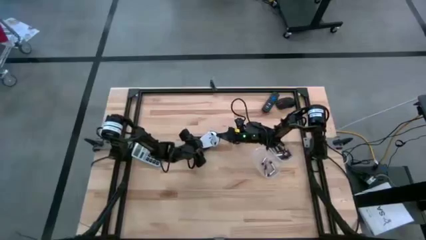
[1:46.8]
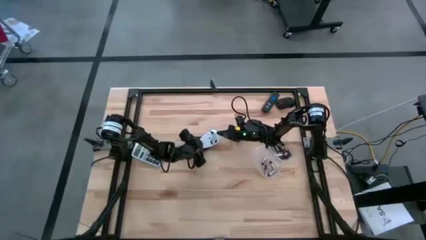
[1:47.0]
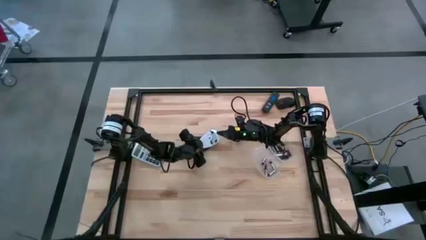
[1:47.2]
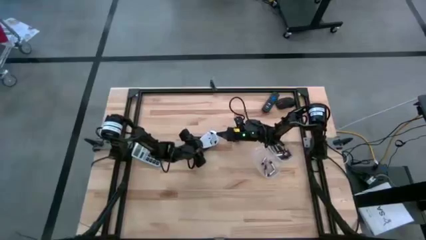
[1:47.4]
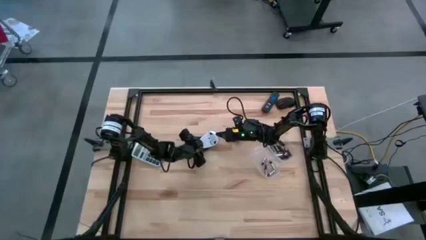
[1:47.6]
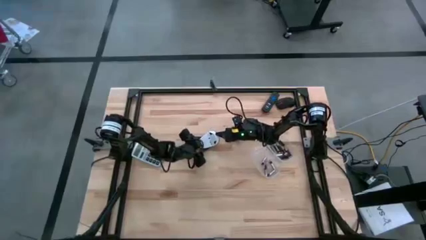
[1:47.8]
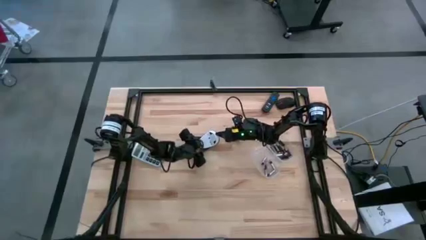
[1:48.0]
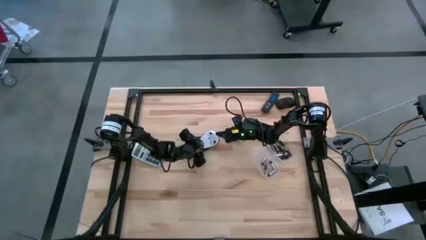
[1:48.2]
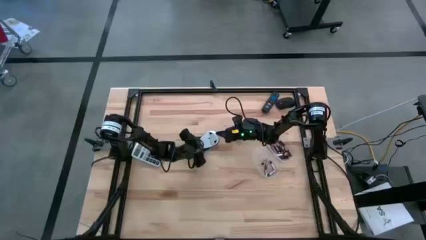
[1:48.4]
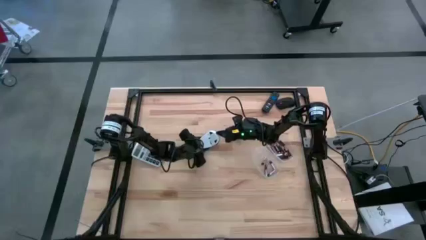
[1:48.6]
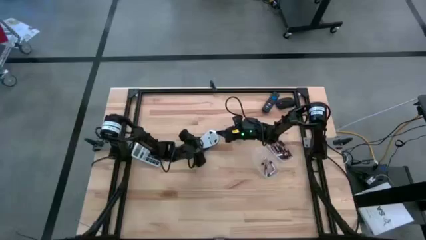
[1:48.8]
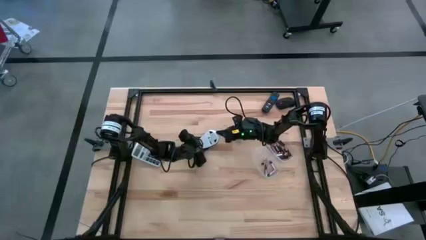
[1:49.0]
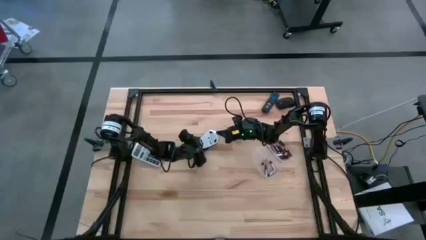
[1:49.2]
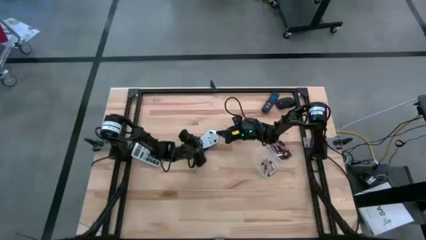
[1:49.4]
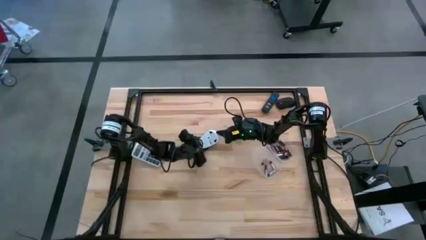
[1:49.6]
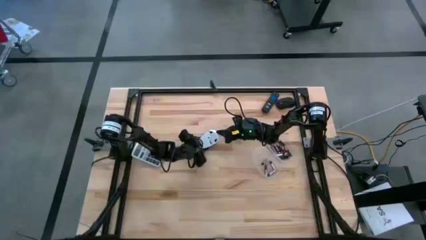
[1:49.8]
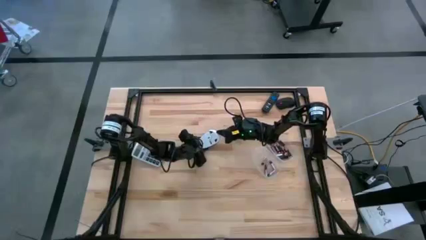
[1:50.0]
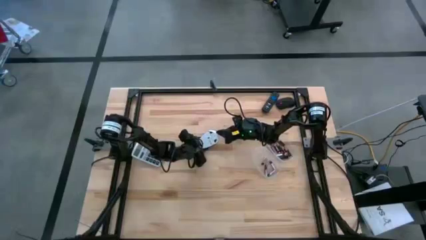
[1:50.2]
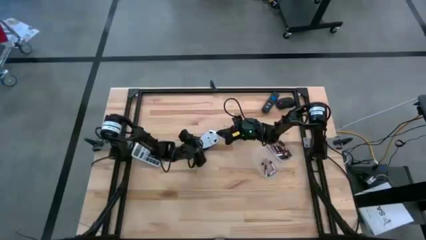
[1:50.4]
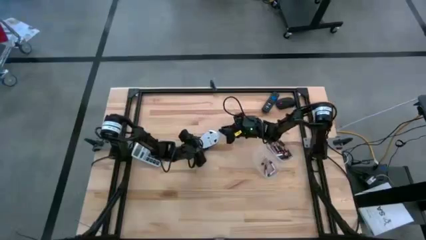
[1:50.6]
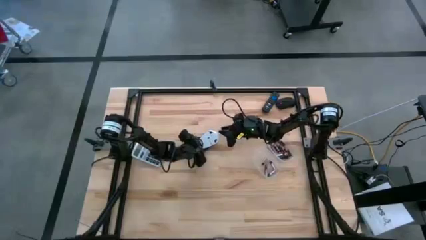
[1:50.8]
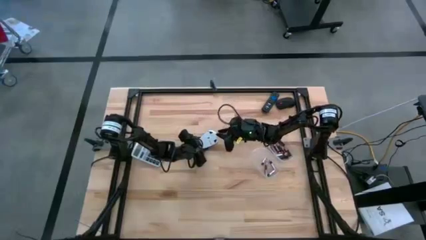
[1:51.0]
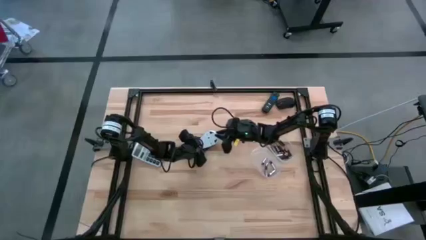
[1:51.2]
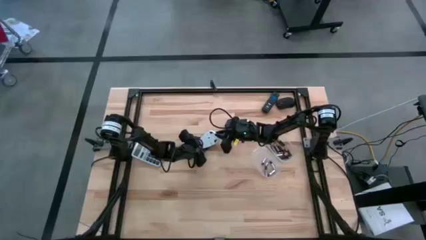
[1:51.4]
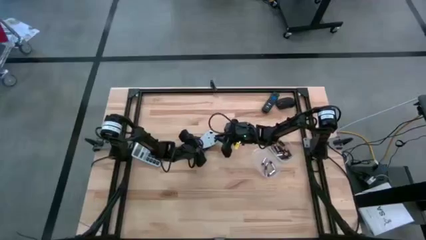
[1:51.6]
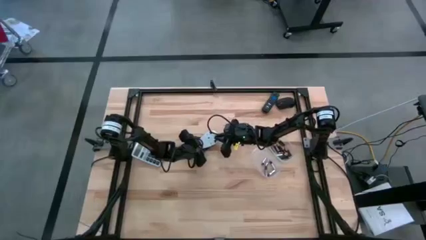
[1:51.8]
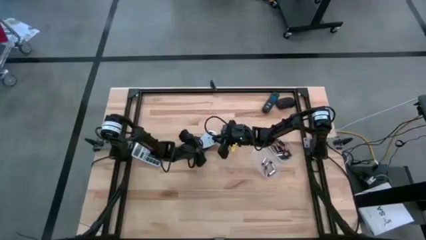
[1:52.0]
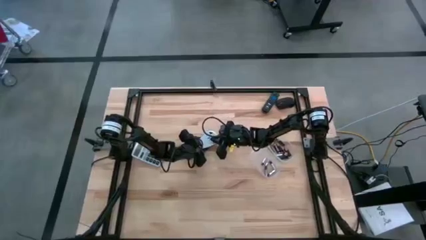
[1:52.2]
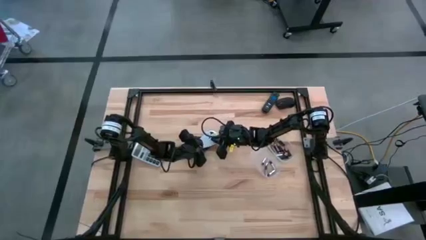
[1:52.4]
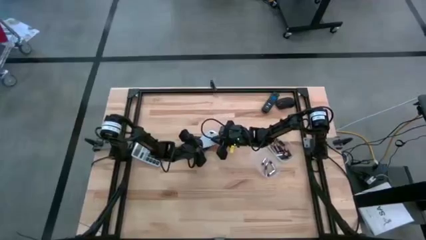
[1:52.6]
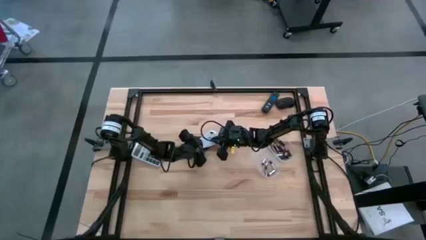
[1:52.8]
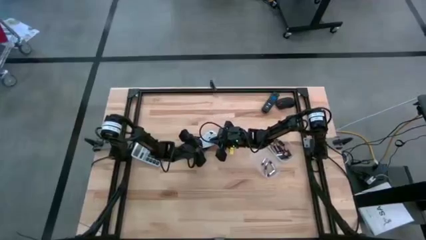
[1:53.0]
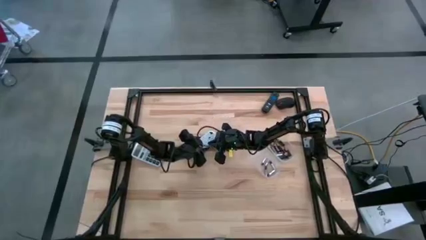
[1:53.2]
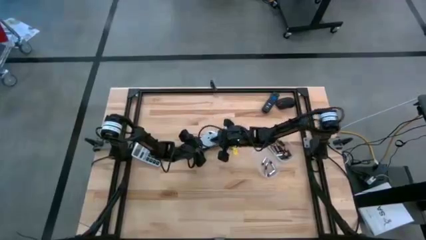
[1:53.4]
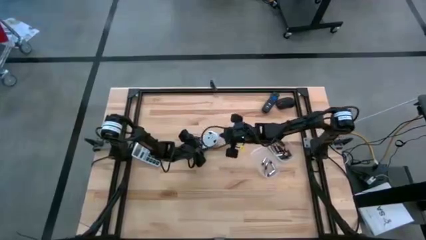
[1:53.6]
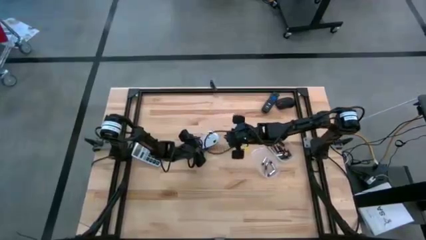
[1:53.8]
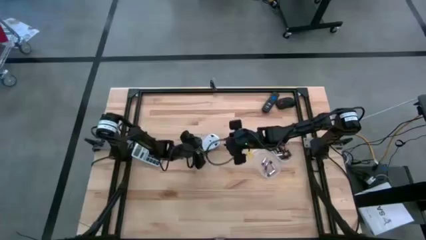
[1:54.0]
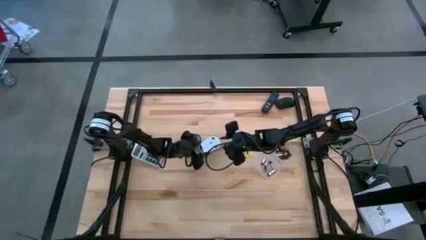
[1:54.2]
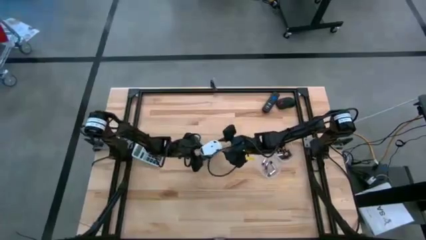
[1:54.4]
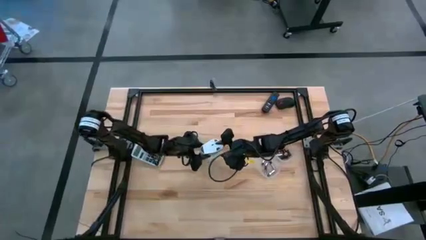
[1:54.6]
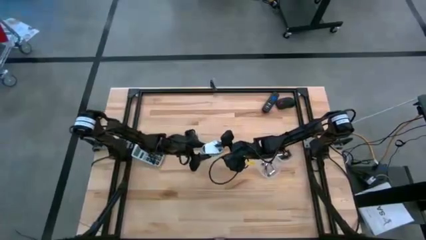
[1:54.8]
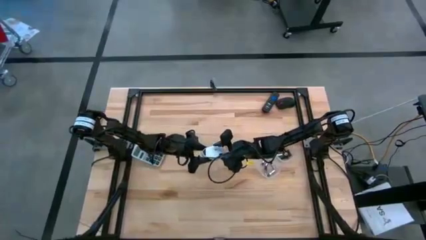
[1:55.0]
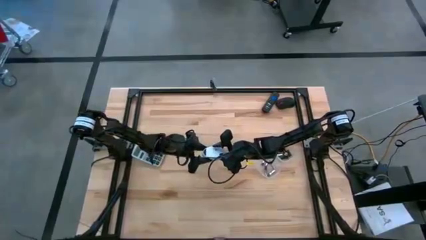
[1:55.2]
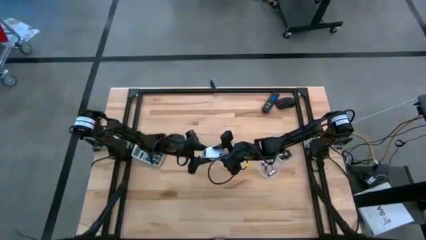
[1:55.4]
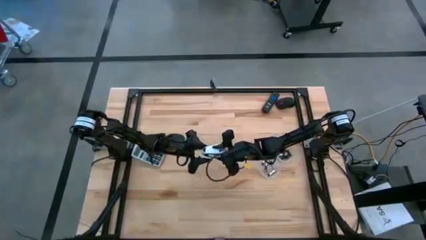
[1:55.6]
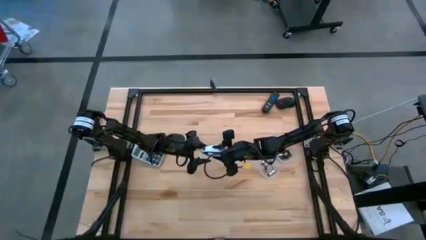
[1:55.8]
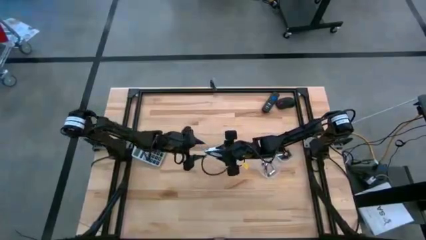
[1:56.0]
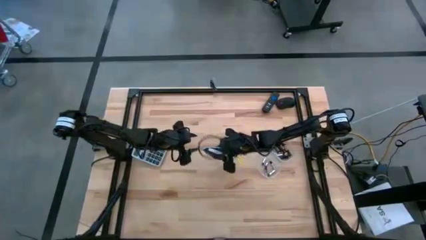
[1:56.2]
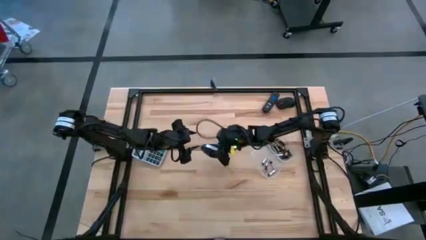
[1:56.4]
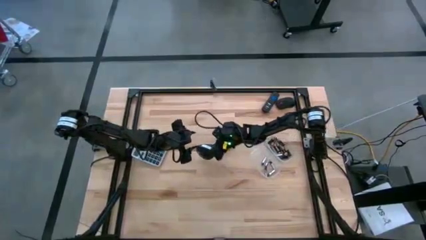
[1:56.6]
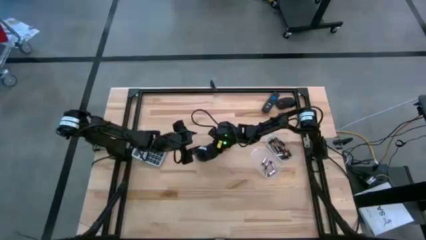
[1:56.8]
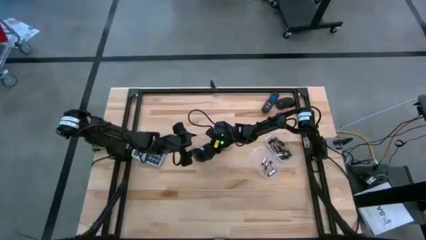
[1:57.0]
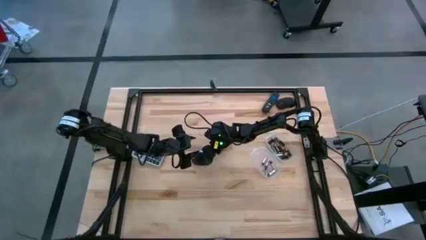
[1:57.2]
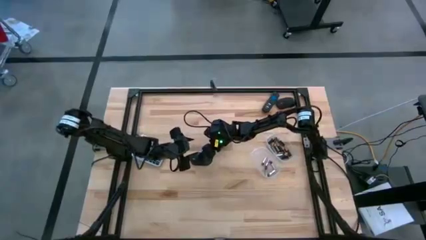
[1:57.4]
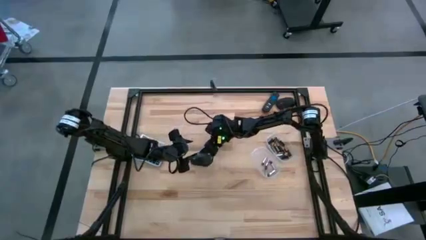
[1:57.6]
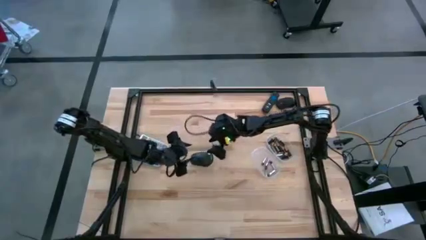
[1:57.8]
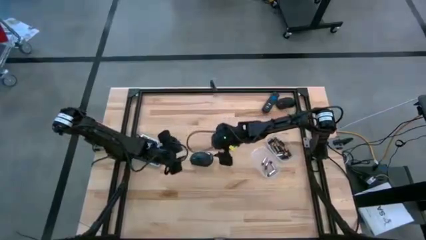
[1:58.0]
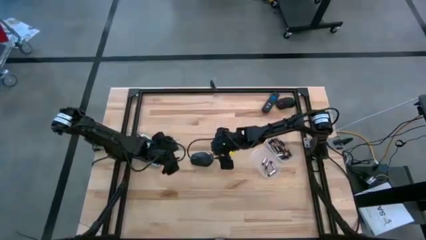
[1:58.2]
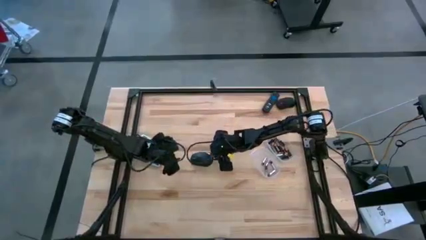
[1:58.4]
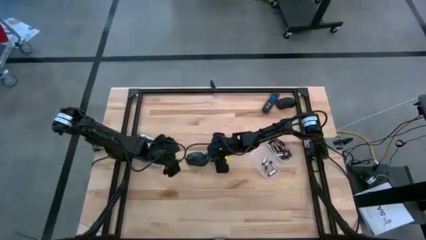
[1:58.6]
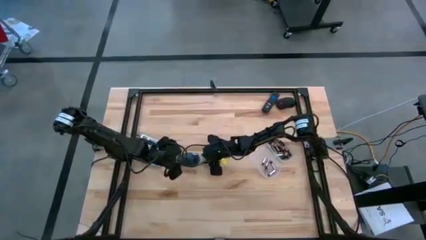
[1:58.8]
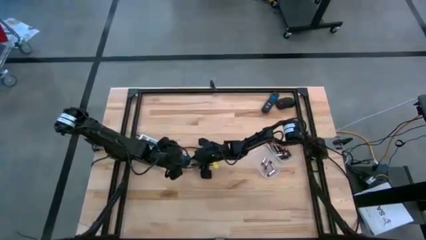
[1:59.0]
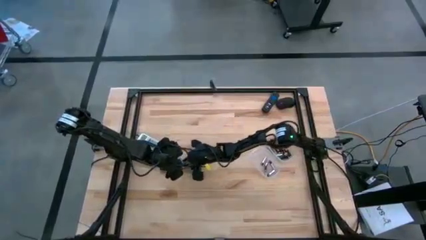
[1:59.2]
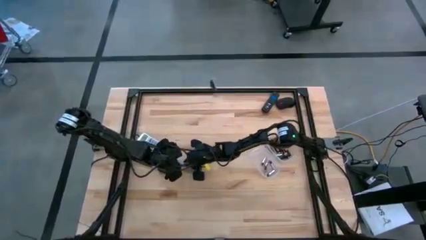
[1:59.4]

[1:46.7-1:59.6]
Task: Insert battery
Close the black/white mouse battery compartment

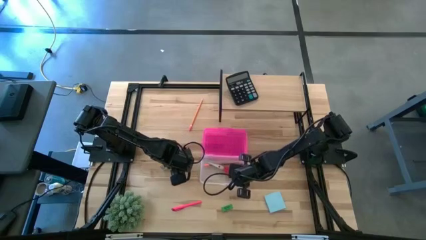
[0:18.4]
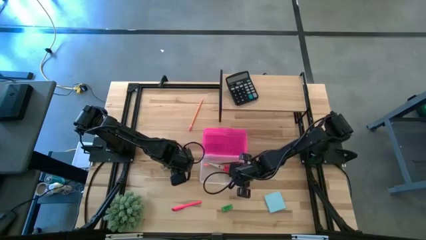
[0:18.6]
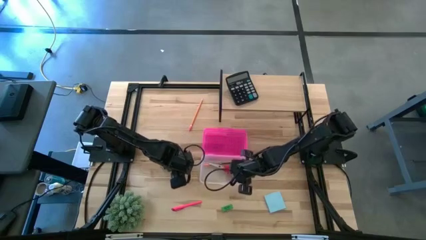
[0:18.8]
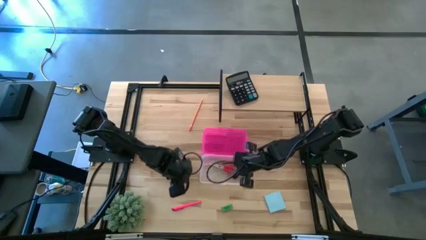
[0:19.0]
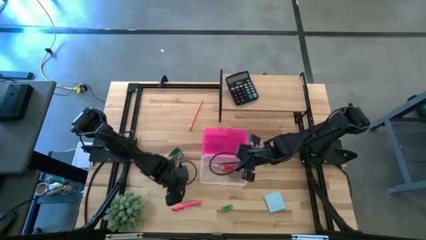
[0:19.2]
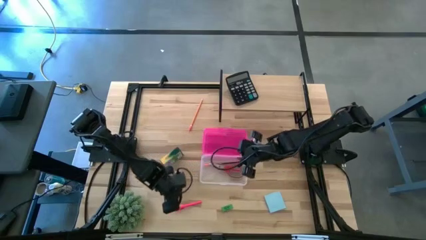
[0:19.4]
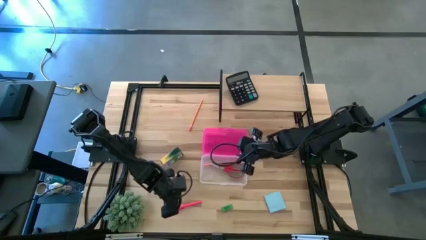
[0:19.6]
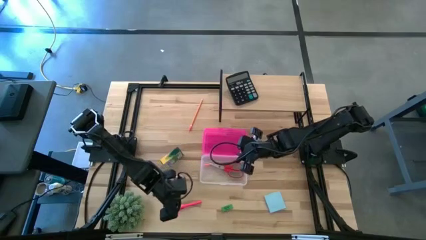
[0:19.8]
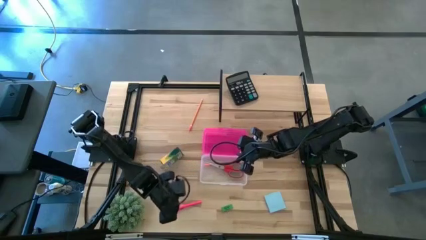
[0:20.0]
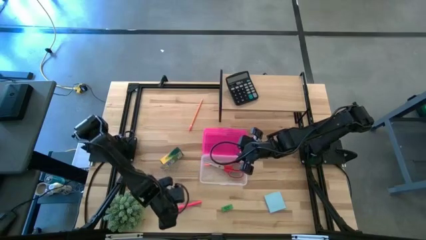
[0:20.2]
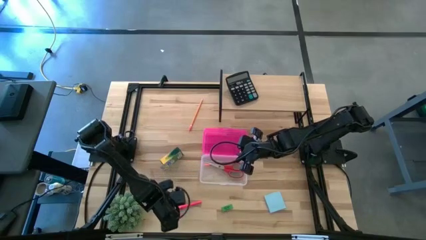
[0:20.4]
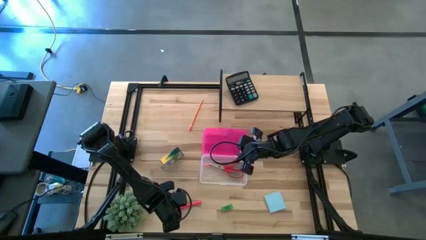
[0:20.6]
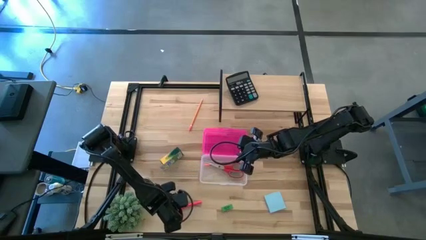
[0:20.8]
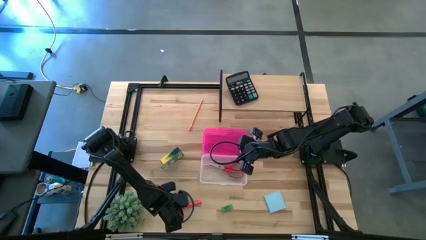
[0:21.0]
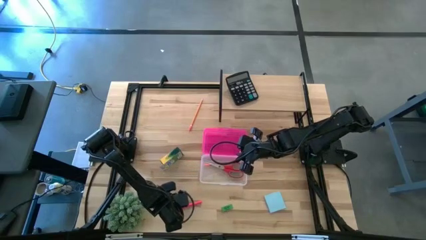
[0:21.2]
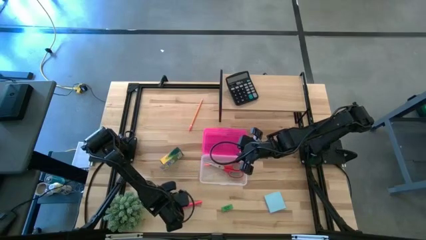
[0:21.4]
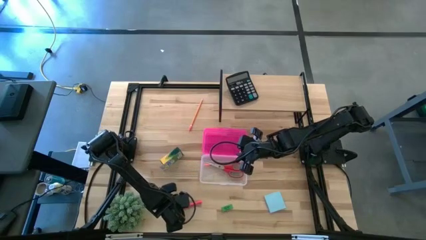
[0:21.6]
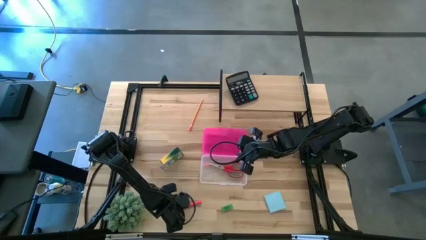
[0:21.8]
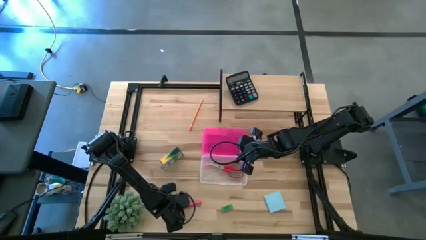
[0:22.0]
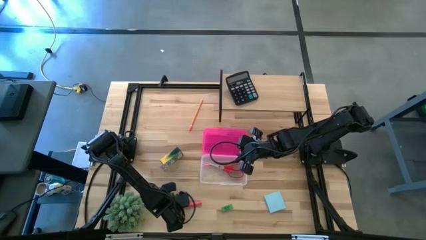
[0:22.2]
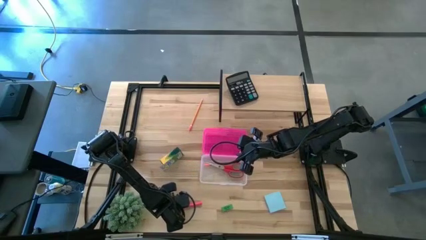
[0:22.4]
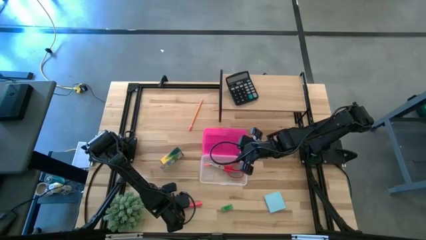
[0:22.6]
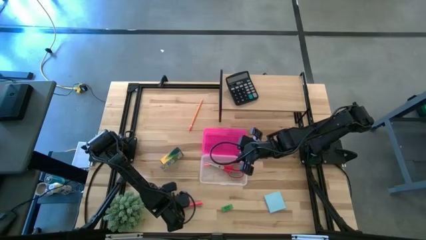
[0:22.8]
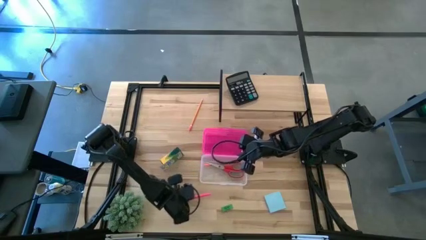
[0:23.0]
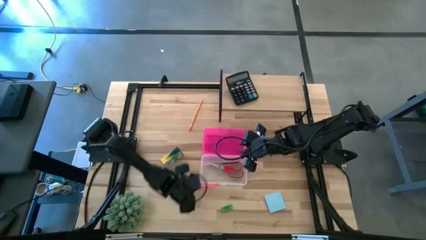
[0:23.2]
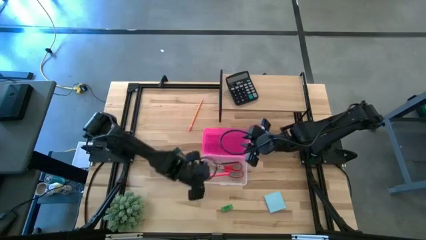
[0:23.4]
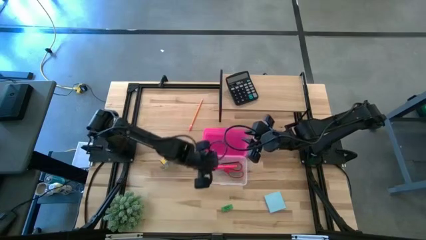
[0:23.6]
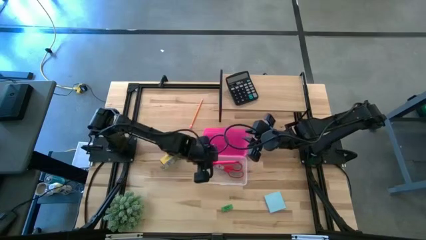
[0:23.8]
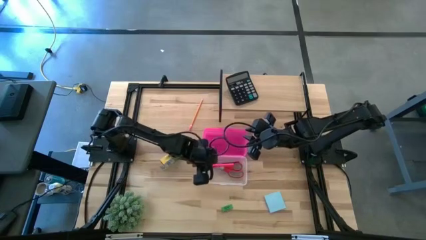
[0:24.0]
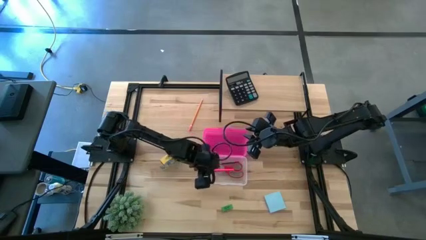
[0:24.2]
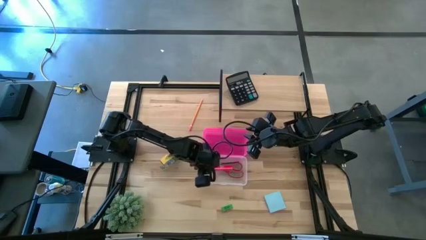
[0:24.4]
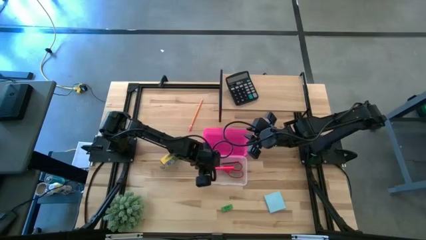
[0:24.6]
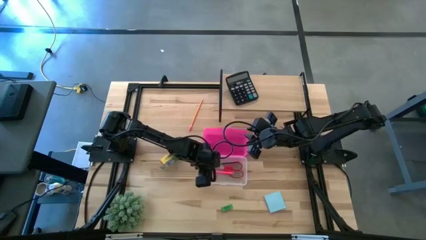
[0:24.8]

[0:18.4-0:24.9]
Task: Pack school essentials
Put the pink pen into the supply box
